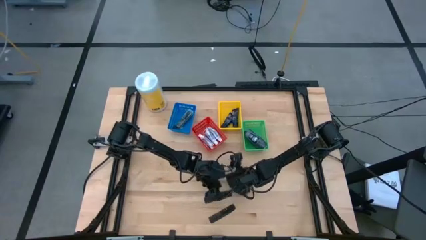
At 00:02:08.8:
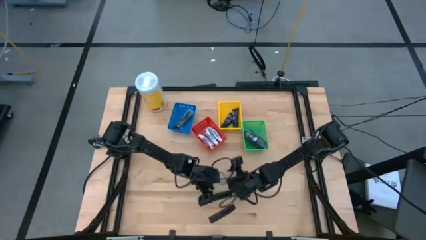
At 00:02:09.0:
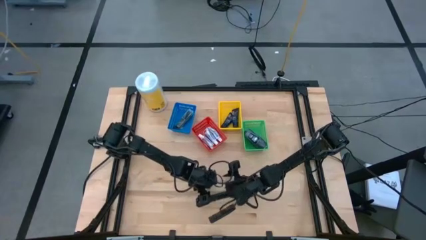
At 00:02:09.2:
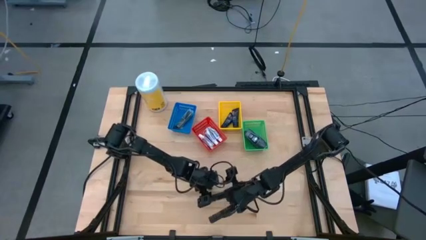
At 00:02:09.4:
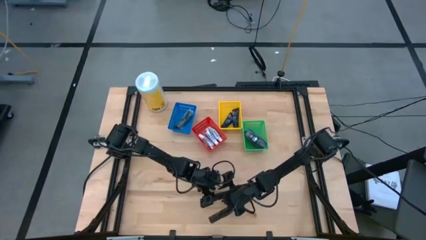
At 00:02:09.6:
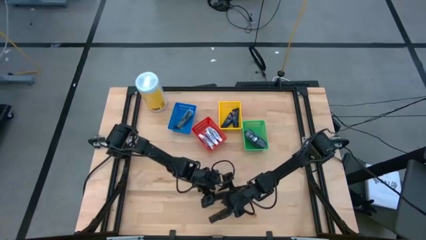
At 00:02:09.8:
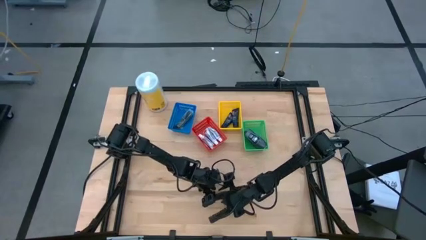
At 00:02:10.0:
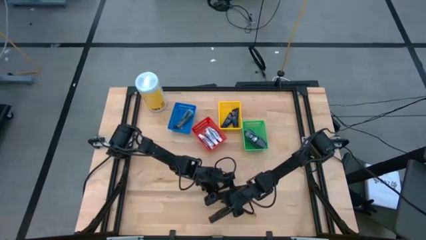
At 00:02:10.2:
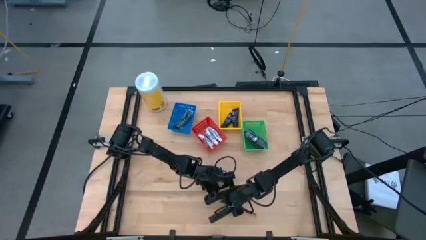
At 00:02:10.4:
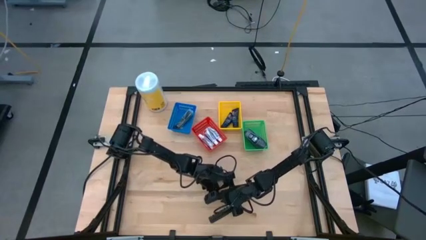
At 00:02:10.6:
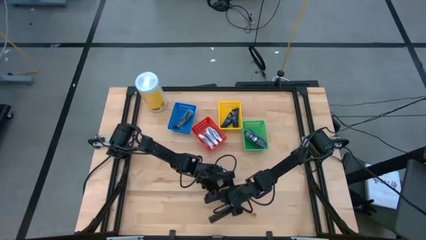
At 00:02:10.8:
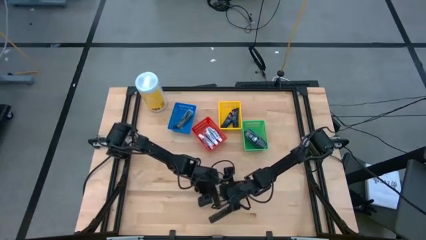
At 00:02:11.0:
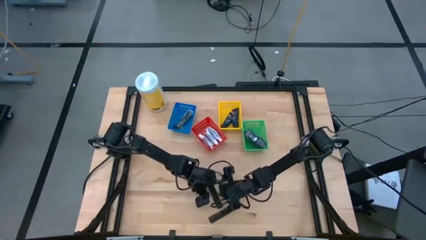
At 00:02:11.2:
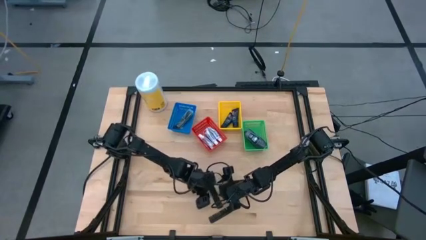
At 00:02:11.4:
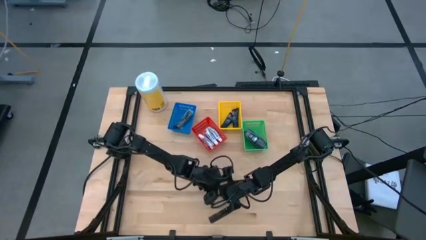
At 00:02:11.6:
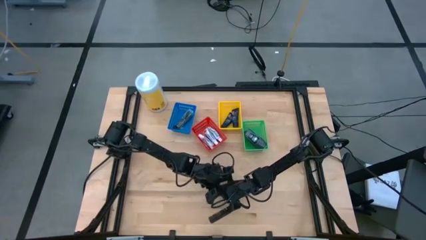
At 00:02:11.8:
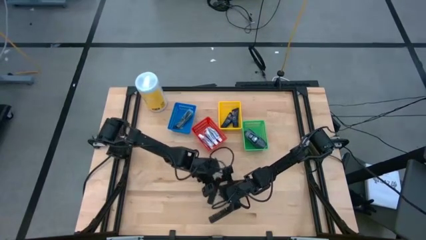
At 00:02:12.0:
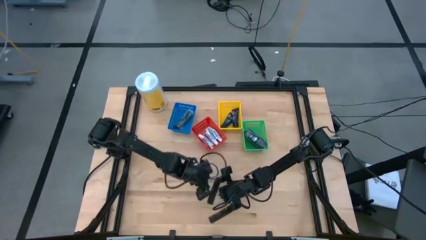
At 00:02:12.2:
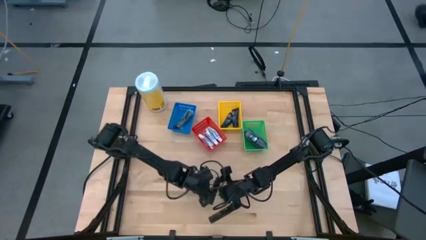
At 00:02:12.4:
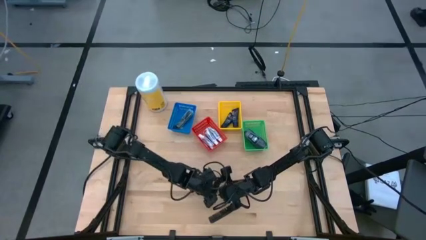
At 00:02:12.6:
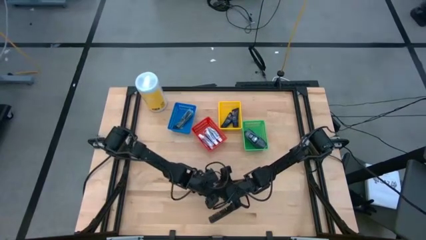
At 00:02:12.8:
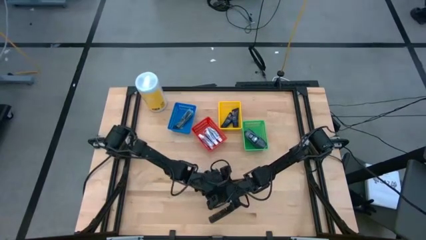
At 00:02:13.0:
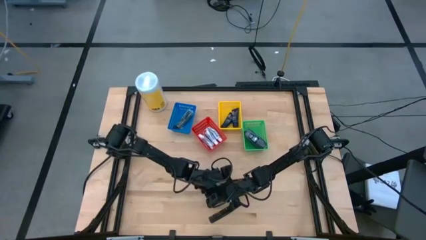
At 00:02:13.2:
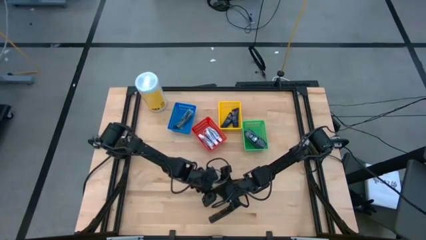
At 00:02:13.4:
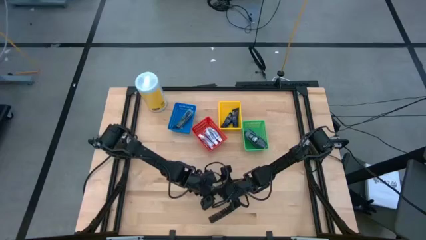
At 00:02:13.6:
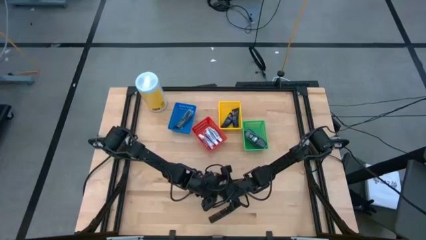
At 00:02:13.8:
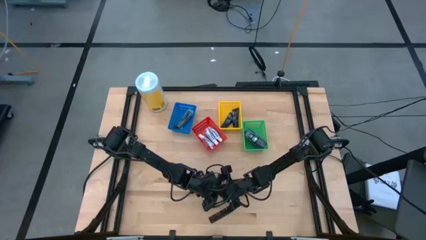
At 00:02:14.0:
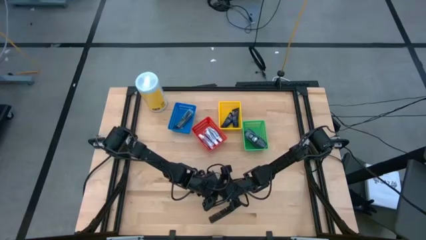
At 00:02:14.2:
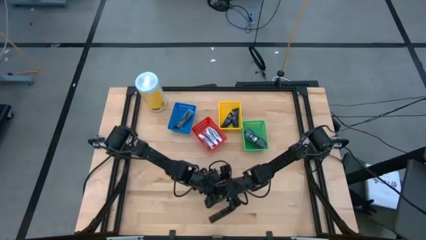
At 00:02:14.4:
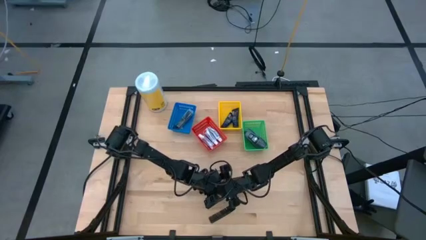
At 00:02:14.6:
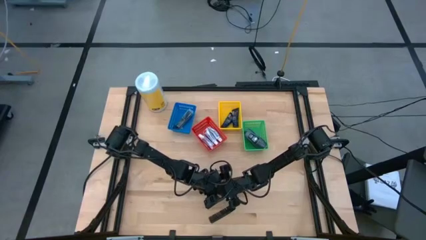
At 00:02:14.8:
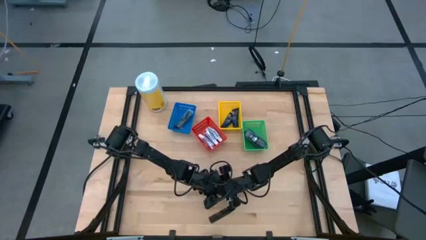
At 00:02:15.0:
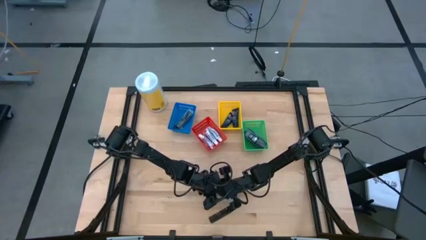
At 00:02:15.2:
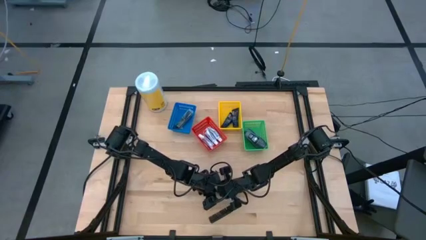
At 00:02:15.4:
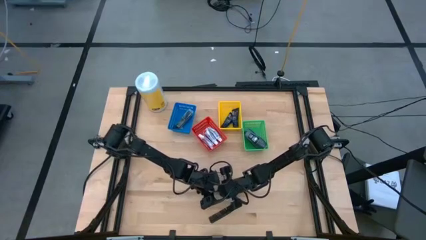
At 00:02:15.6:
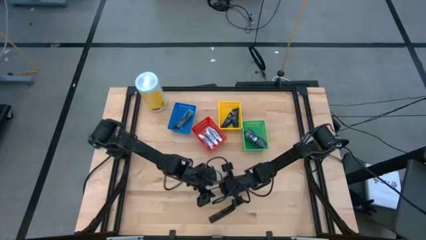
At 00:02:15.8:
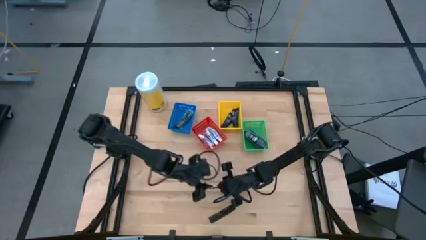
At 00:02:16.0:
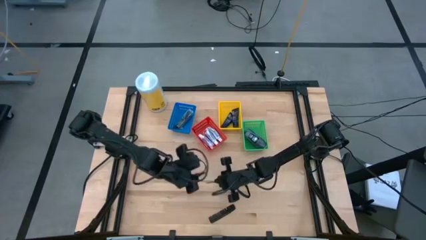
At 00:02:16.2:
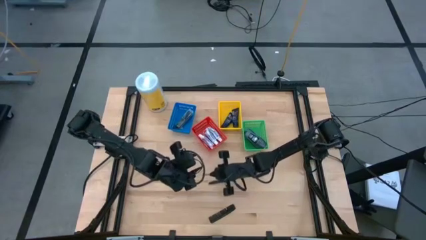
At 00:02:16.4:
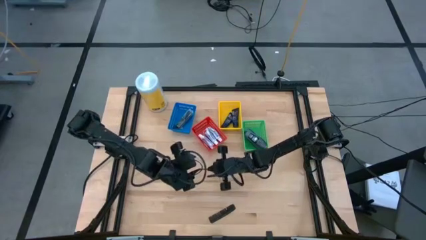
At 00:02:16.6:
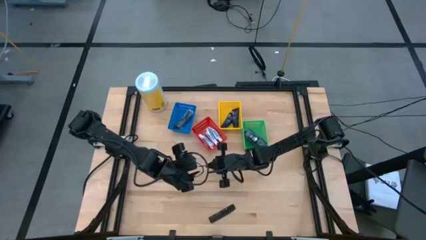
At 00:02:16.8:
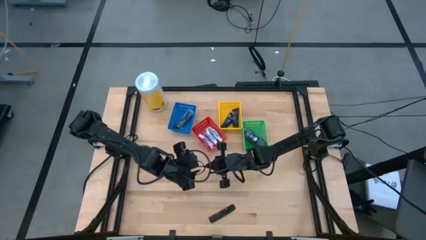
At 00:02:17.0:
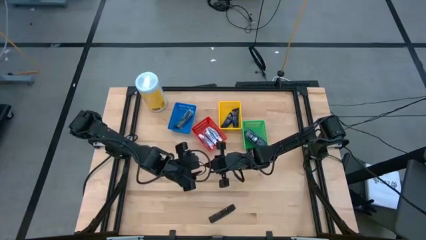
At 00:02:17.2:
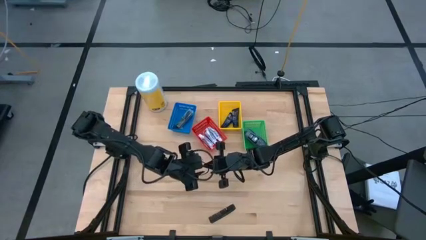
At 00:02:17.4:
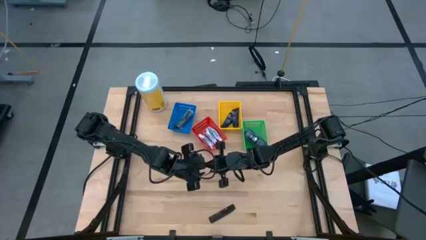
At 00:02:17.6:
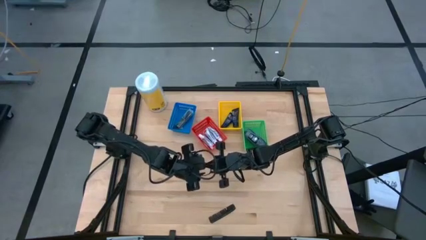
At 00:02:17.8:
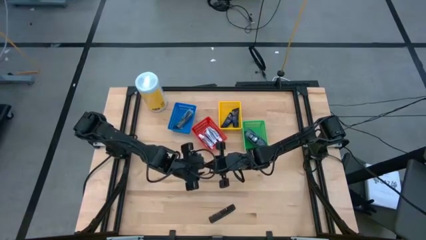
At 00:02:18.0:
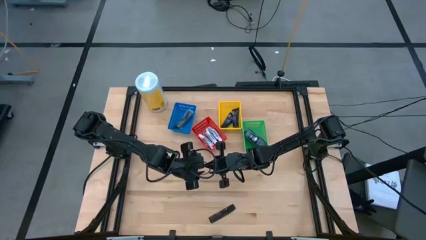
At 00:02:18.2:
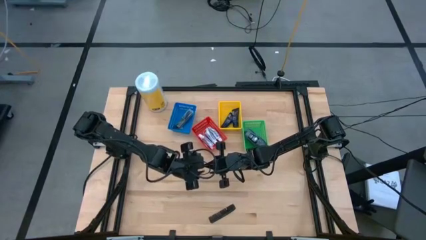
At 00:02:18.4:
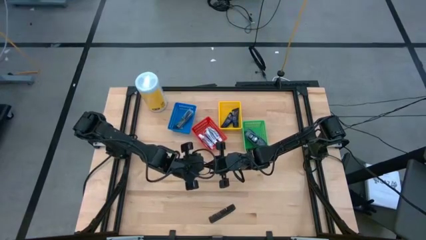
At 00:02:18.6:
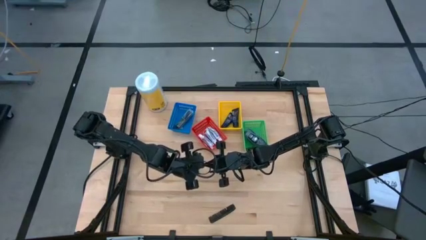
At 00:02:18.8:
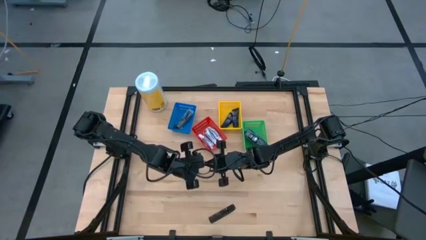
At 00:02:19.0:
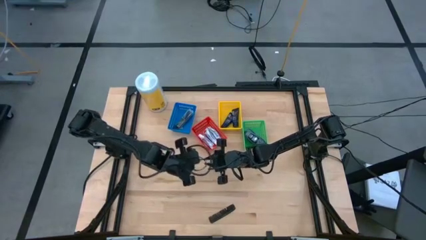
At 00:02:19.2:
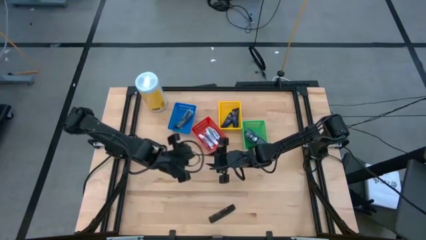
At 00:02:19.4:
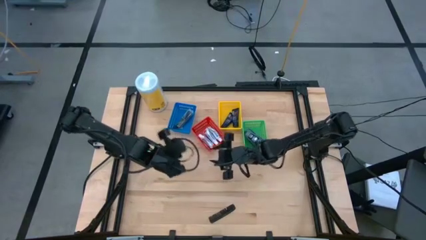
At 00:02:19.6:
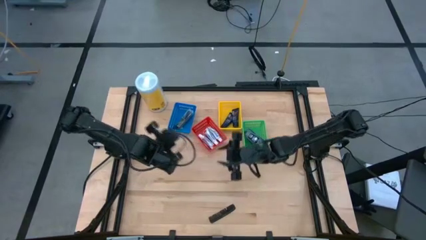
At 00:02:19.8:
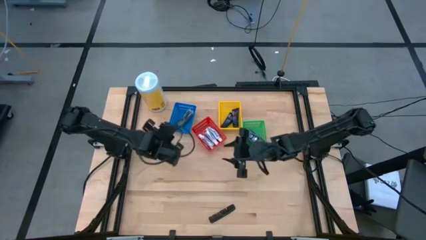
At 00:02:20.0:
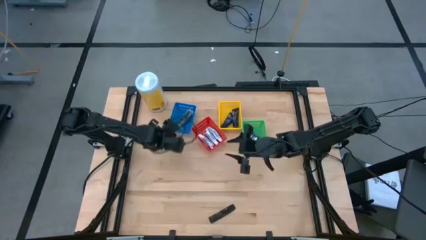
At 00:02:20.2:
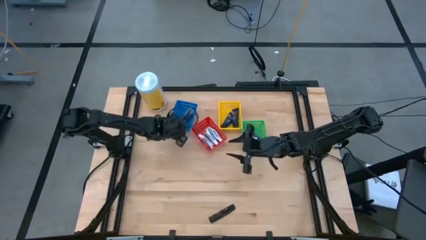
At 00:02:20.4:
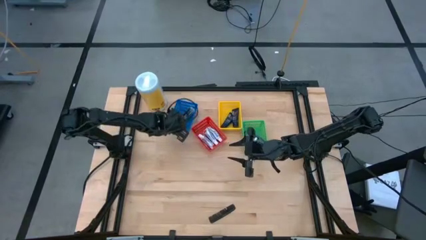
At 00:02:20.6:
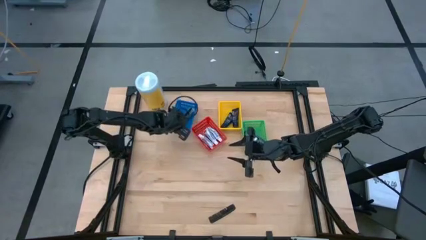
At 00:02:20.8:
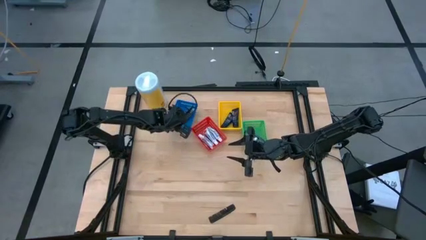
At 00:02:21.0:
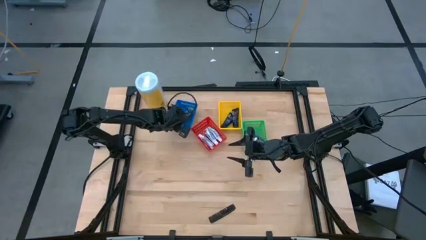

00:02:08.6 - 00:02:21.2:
Task: Pick & Place Travel size toiletries
Put the black comb into the blue bin
